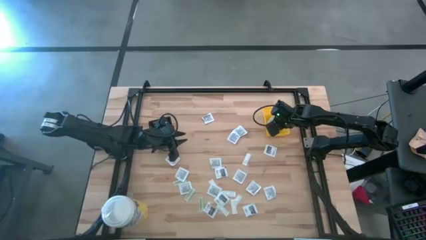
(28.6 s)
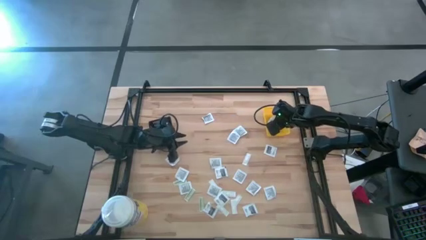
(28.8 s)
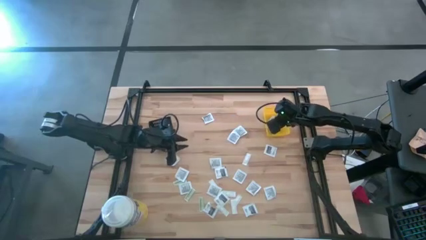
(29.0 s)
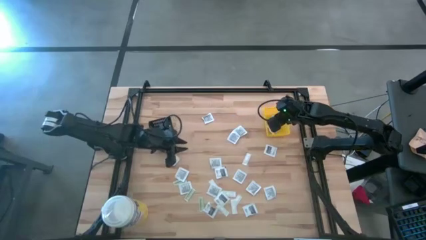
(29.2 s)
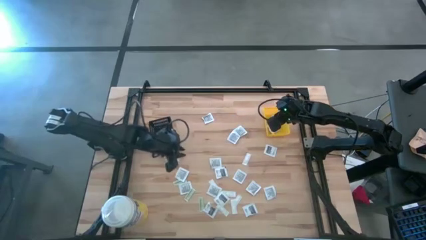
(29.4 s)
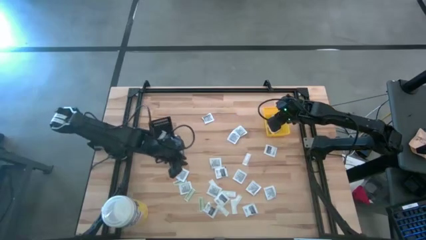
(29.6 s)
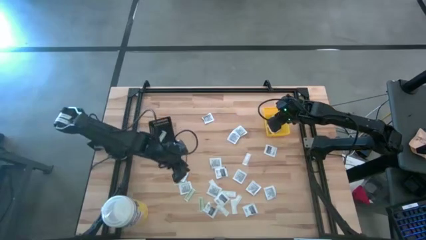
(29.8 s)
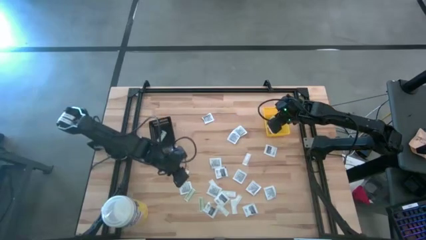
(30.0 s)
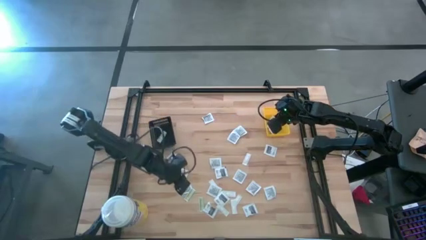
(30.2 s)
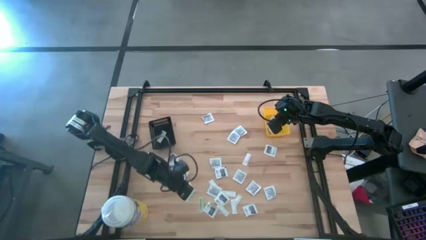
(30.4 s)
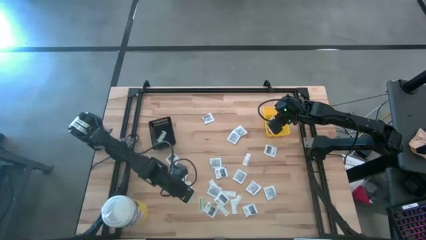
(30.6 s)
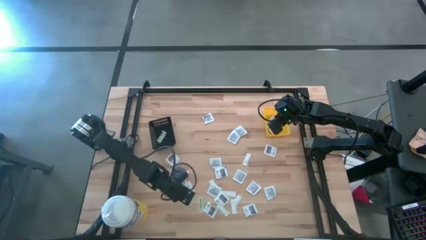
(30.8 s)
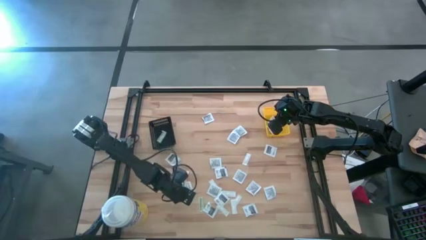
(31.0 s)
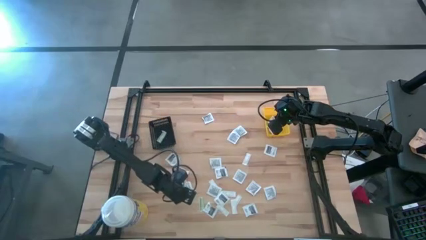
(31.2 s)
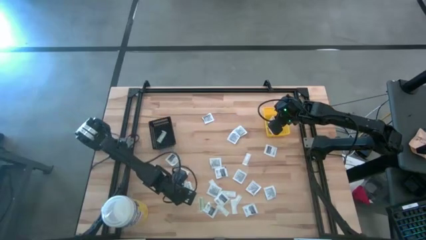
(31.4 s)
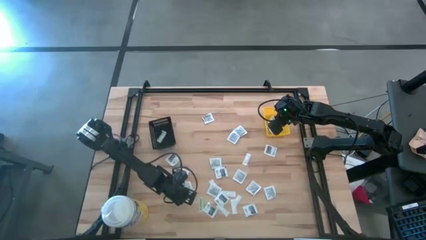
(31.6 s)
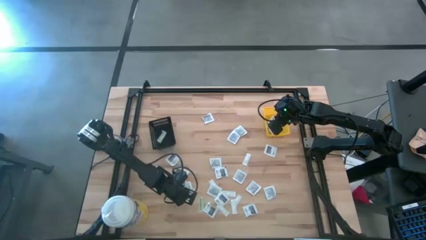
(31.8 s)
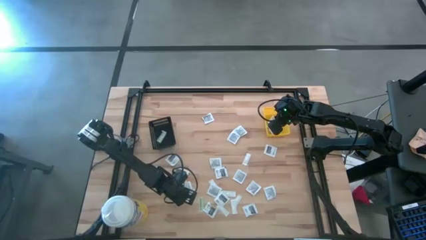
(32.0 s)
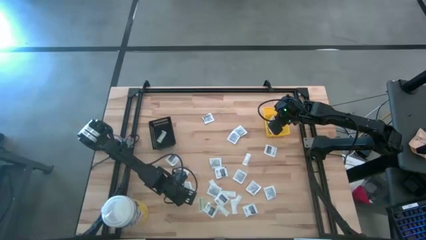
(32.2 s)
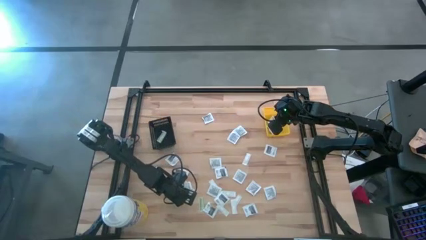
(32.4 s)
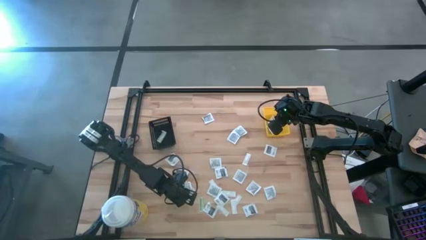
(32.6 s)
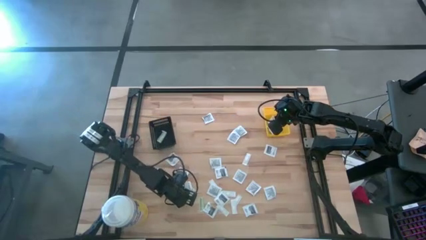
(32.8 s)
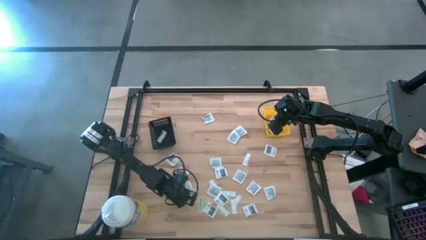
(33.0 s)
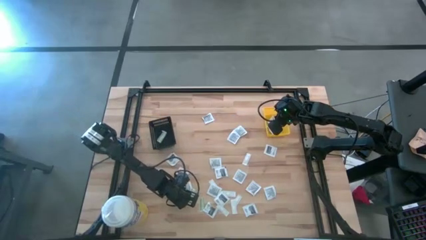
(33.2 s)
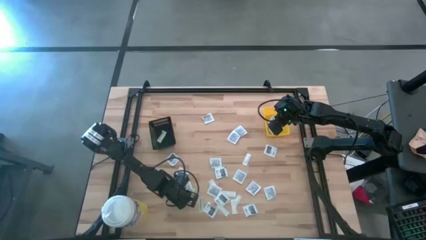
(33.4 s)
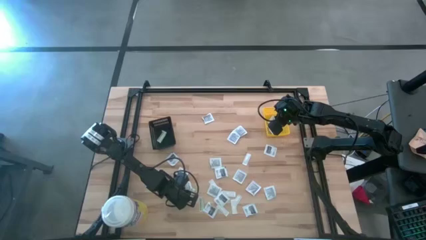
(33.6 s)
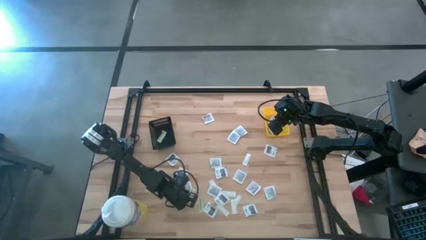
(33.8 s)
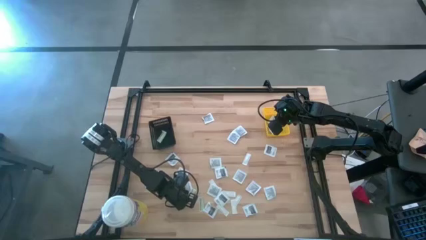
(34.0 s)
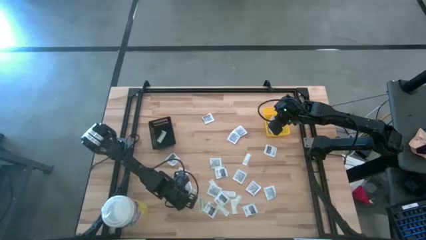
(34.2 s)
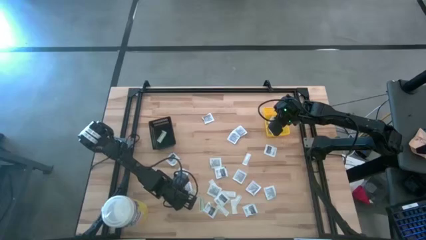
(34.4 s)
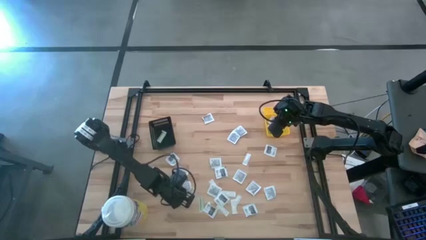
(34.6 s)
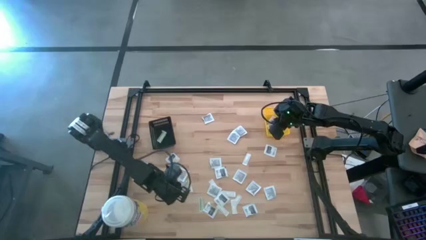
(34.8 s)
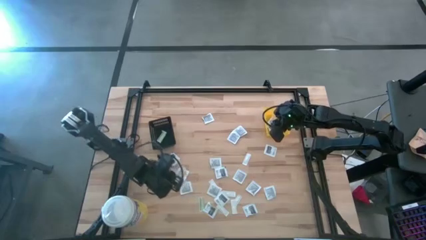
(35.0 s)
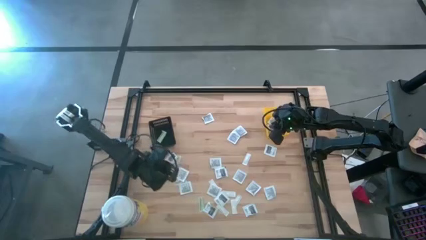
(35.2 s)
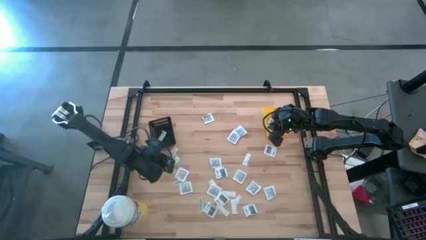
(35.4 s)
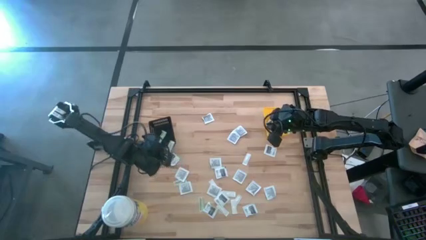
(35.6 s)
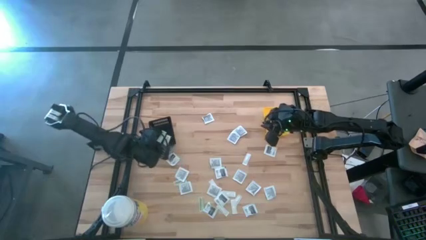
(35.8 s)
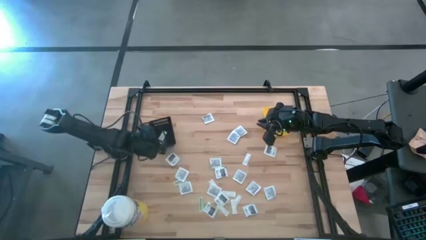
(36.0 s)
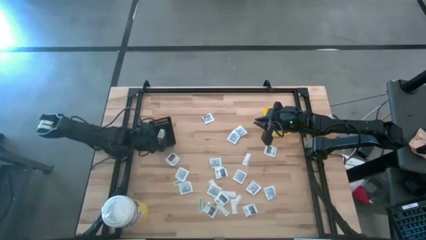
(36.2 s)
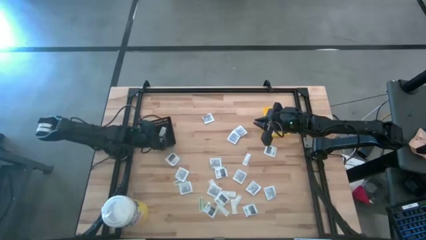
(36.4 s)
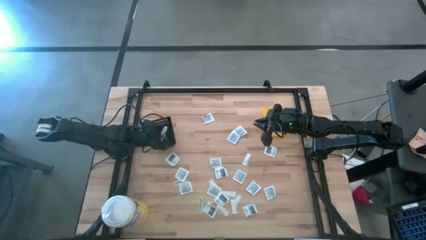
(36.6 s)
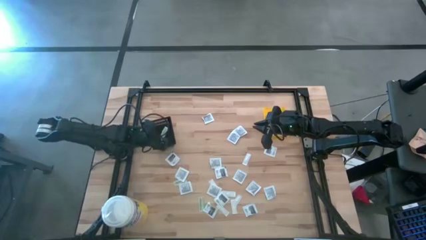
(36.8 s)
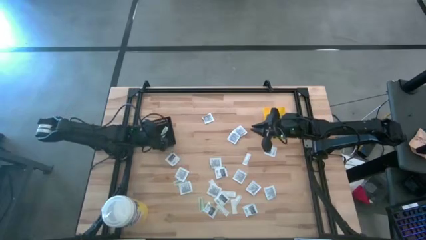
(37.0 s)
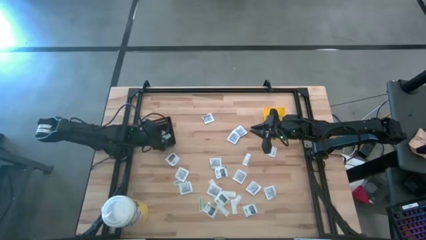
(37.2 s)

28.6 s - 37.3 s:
Task: Pick & Place First Aid Supplies
Put the green bandage into the black bin

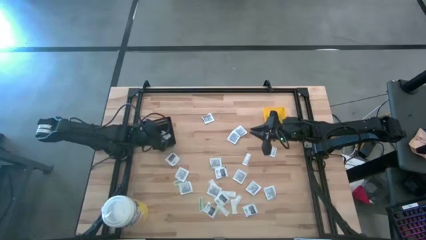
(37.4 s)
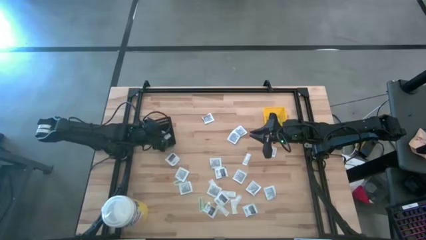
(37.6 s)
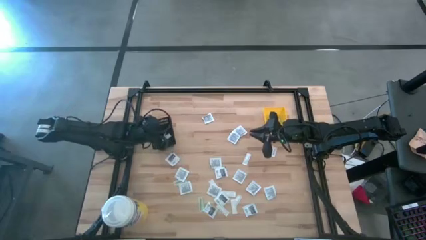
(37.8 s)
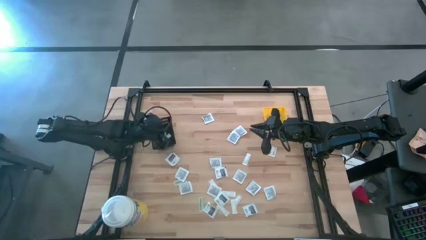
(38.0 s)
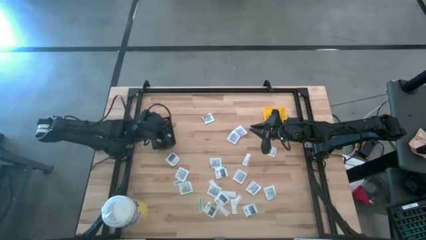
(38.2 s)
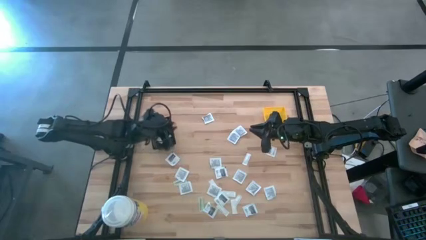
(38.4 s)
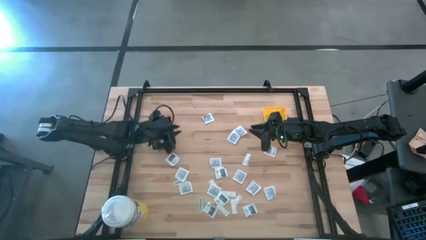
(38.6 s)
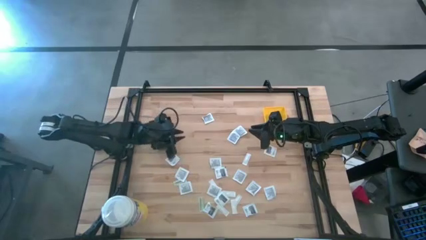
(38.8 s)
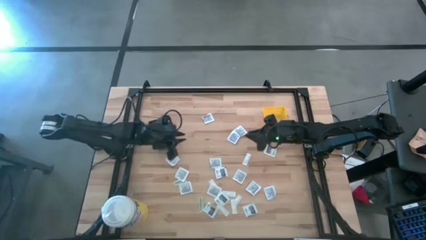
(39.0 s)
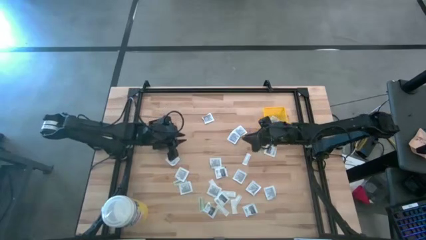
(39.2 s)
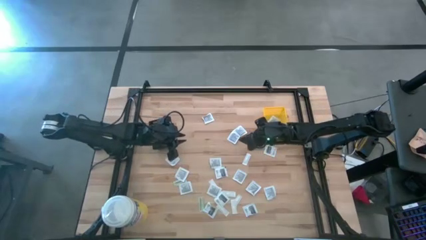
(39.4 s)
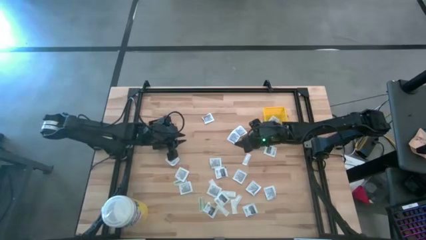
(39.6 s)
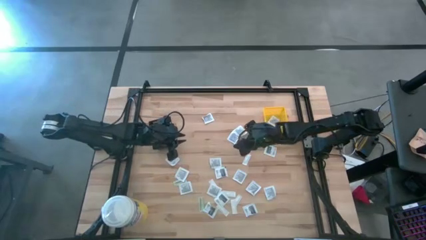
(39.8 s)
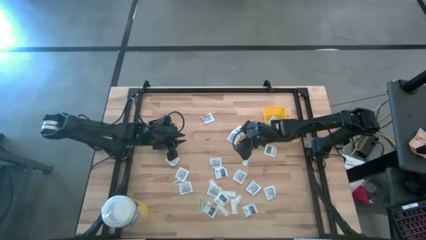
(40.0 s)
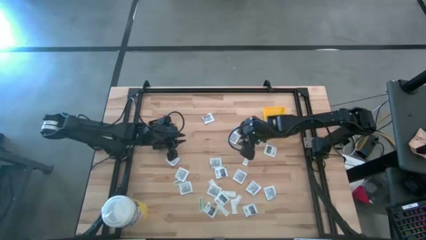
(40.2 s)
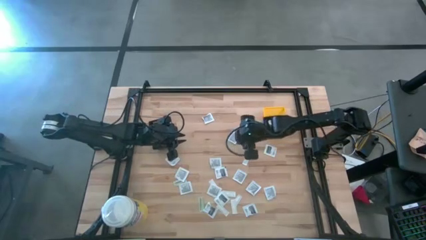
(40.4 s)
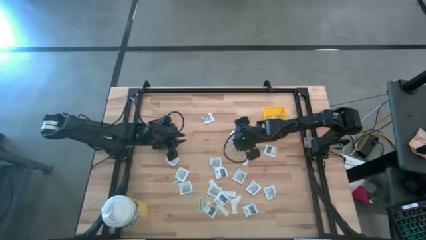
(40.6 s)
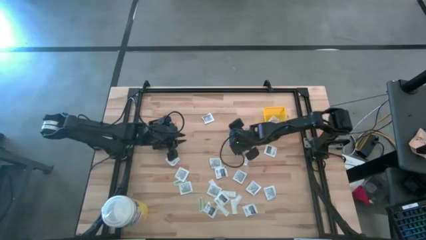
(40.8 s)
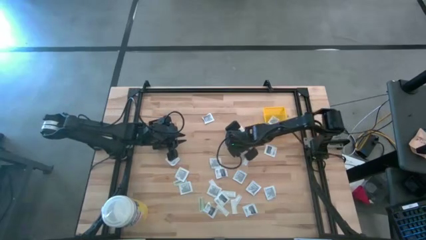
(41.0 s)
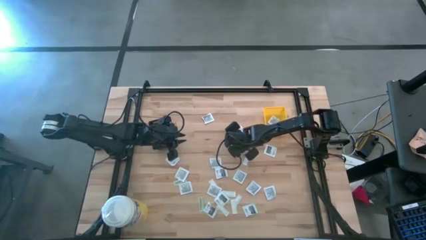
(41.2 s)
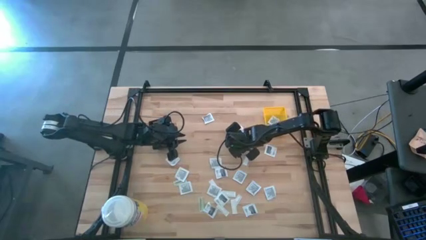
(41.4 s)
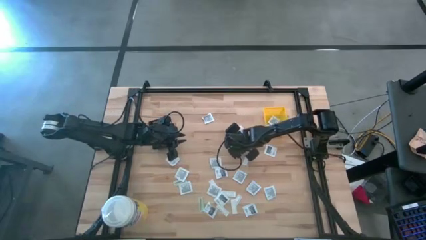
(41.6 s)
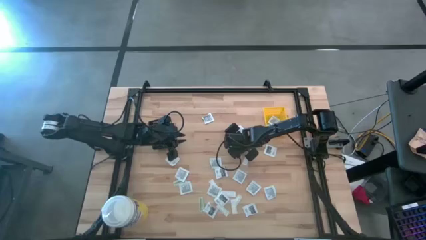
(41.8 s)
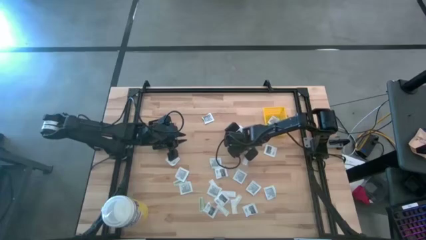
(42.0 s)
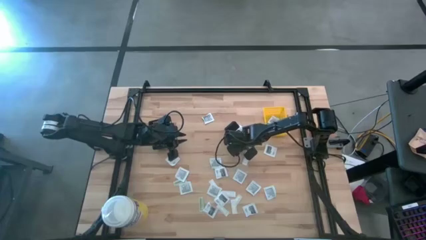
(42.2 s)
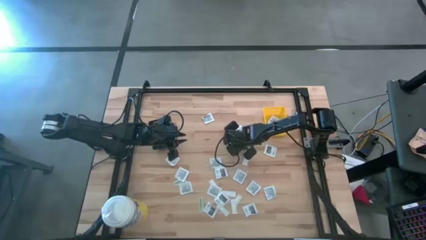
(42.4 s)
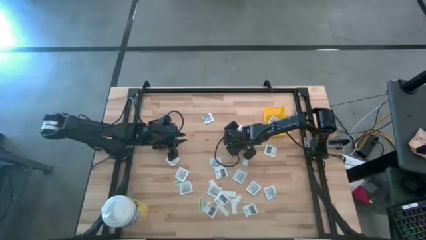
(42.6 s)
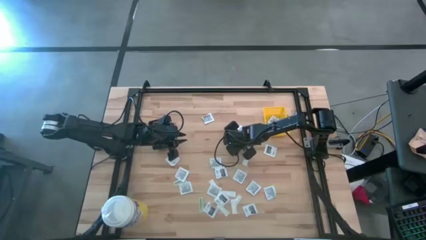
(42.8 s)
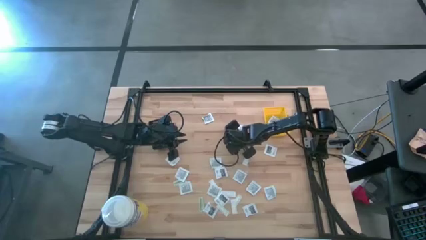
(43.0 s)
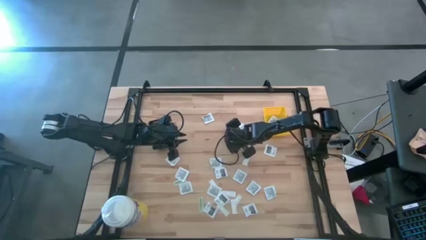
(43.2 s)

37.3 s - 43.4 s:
Put the black pad into the yellow bin
